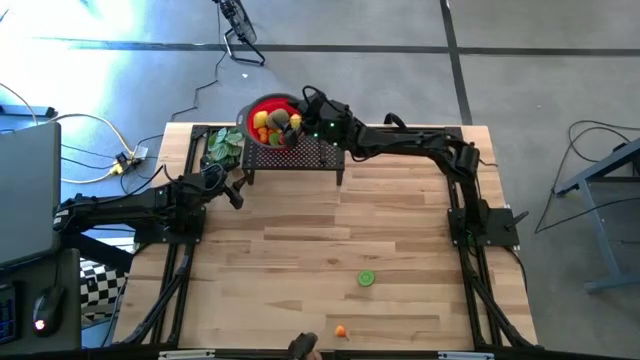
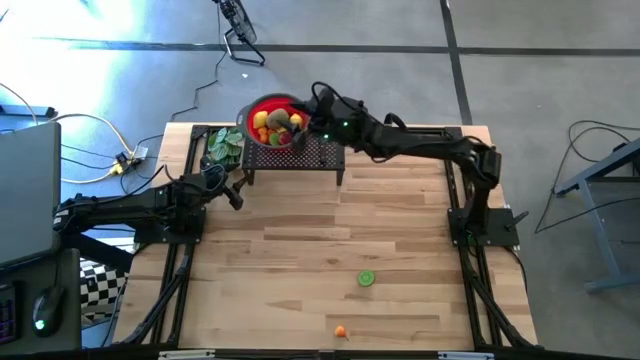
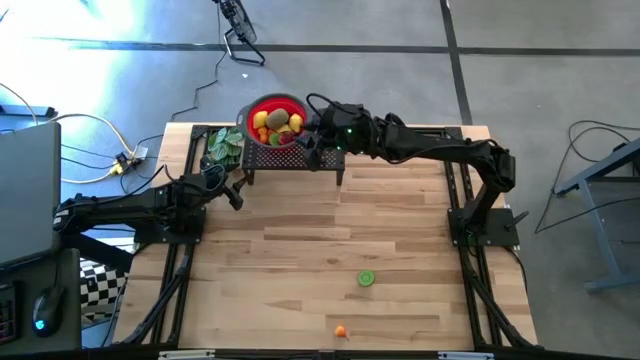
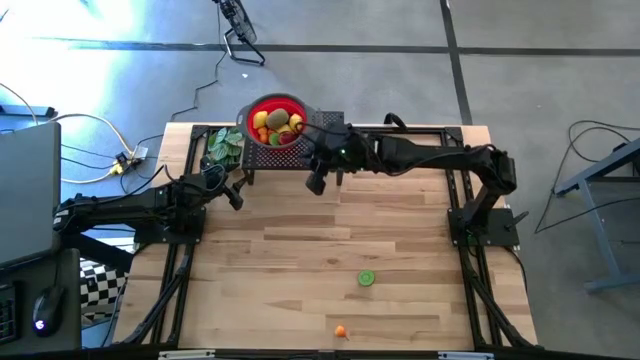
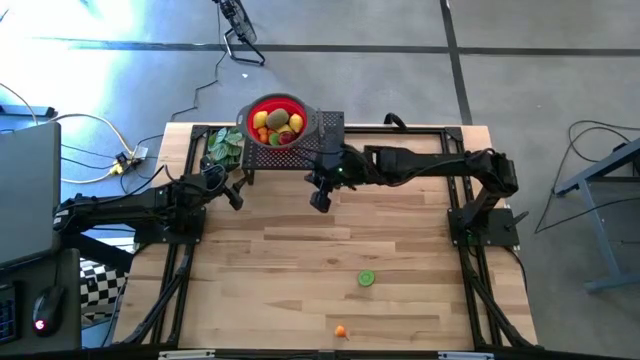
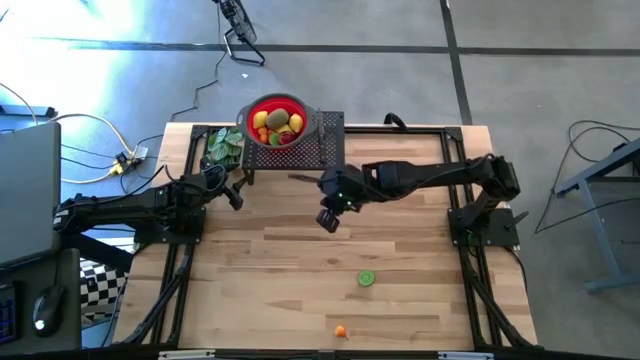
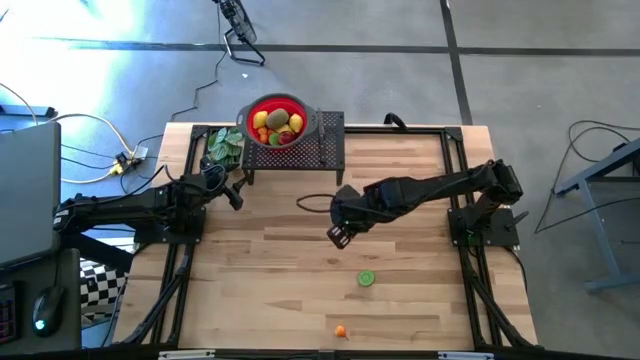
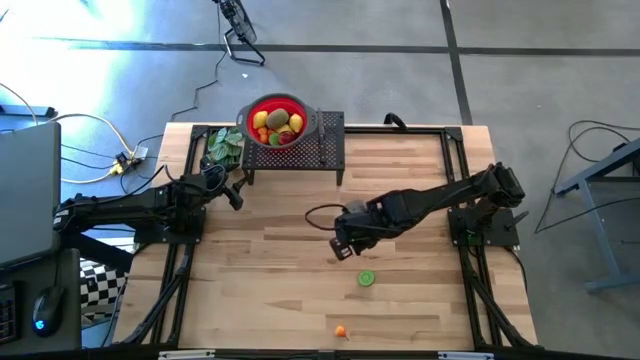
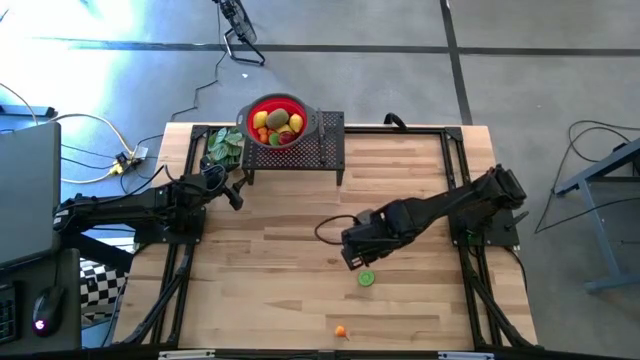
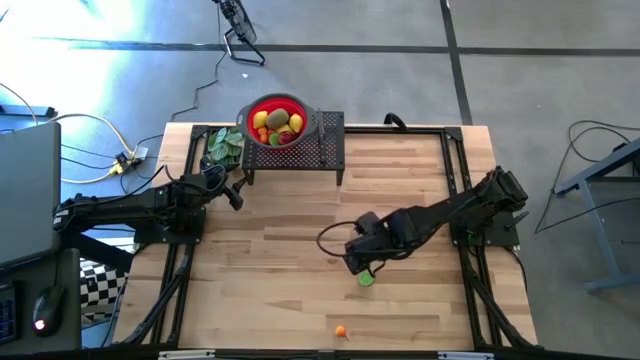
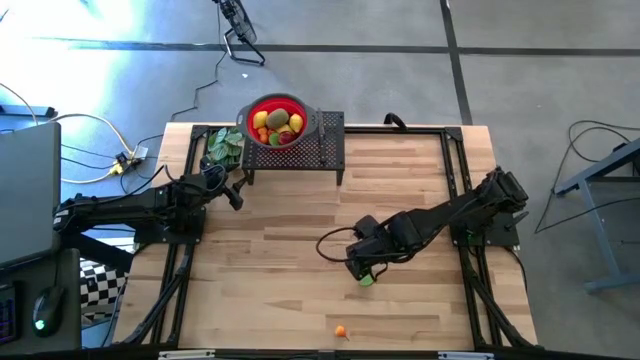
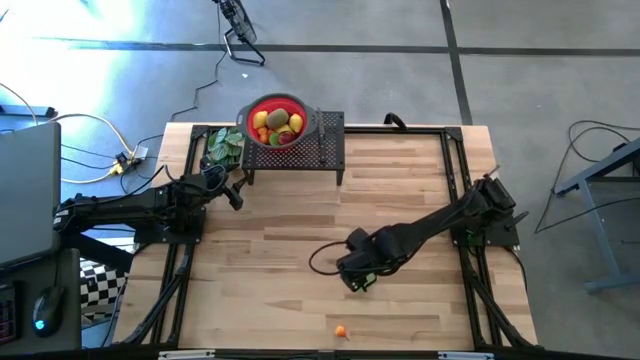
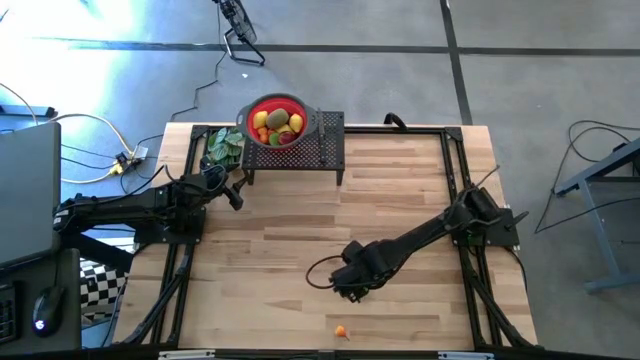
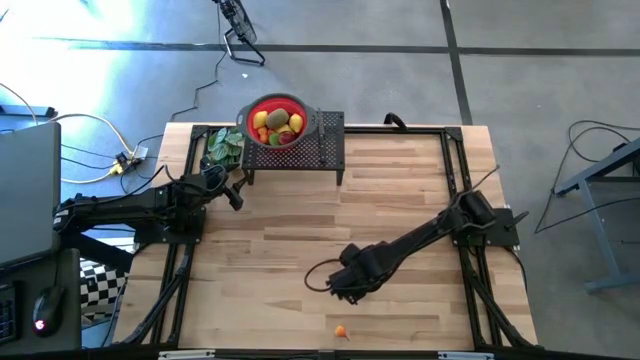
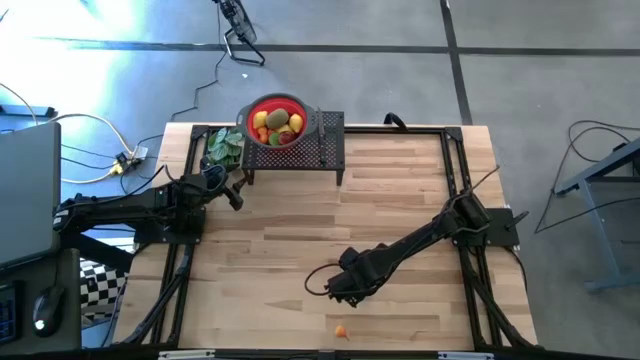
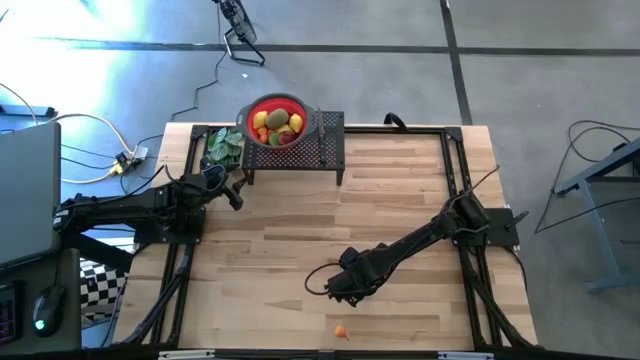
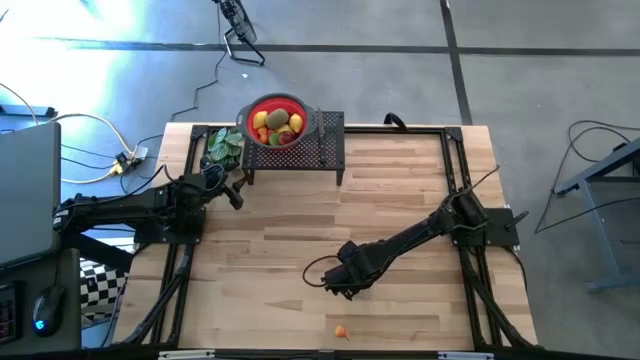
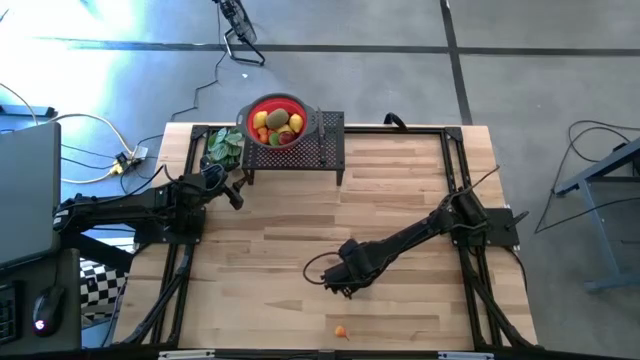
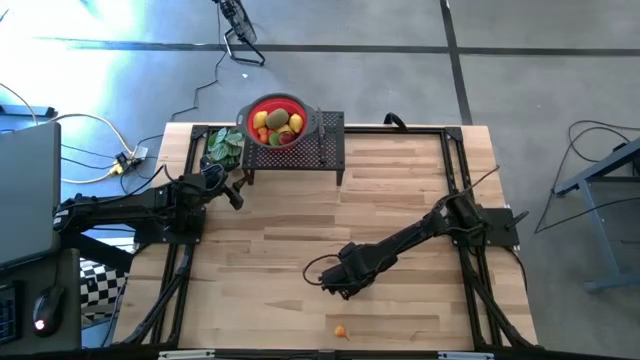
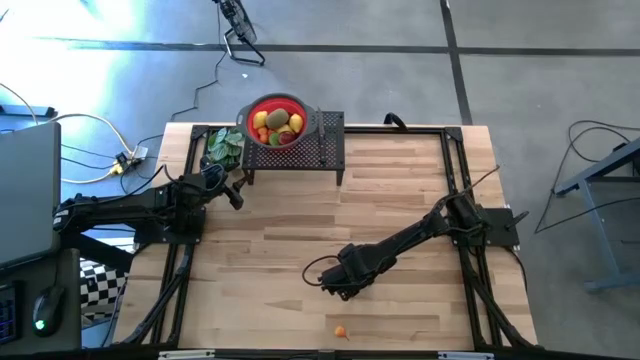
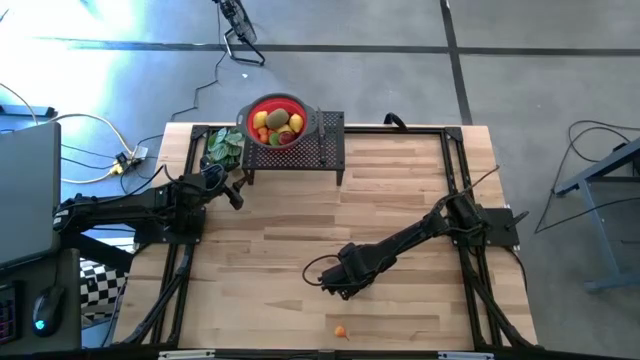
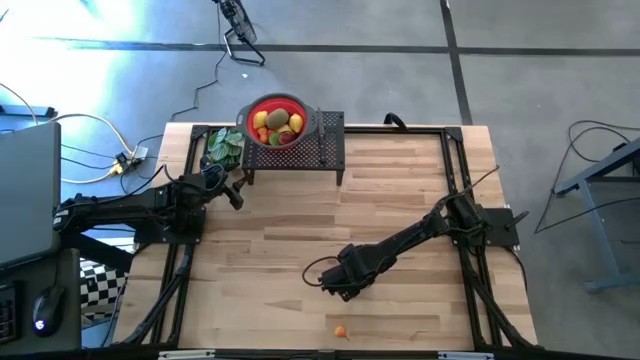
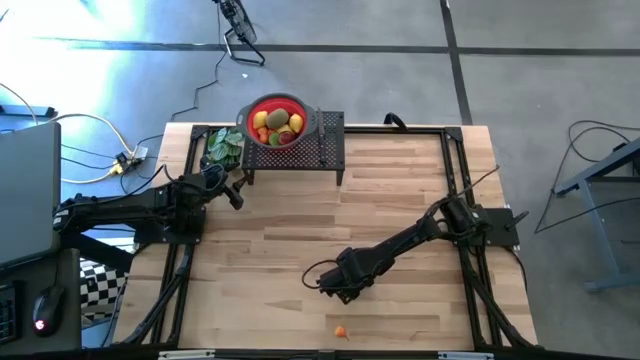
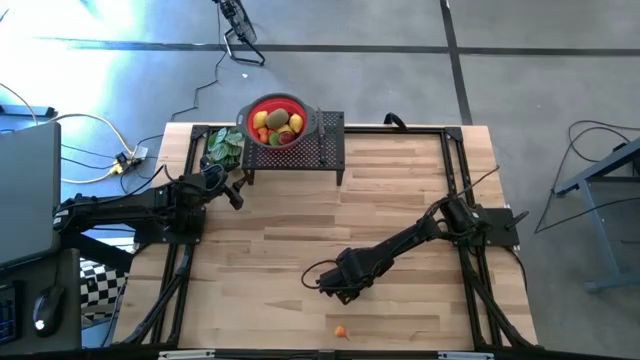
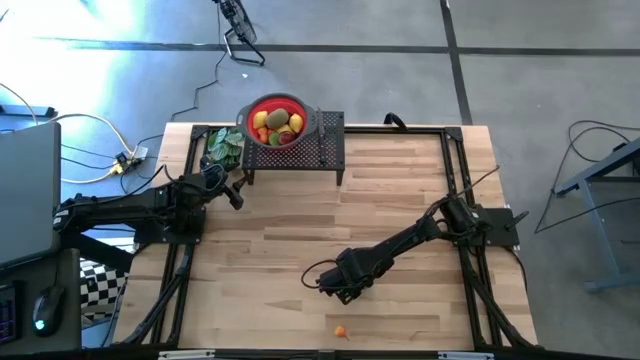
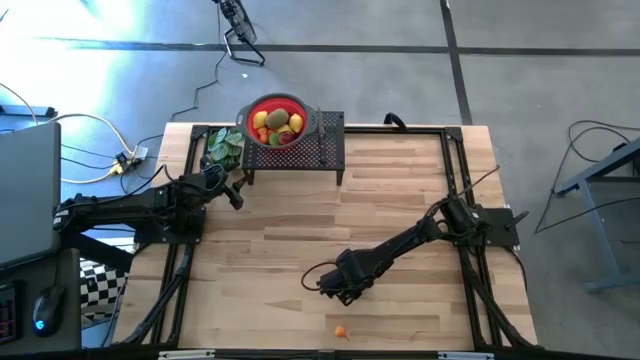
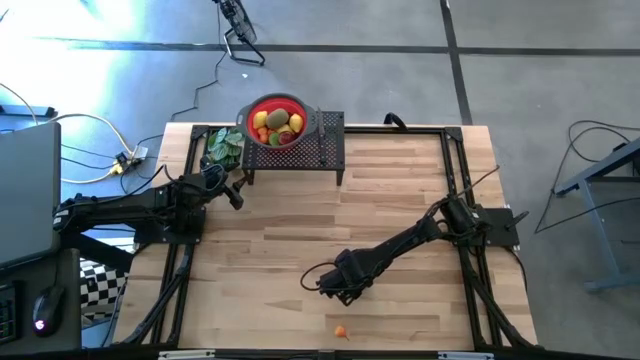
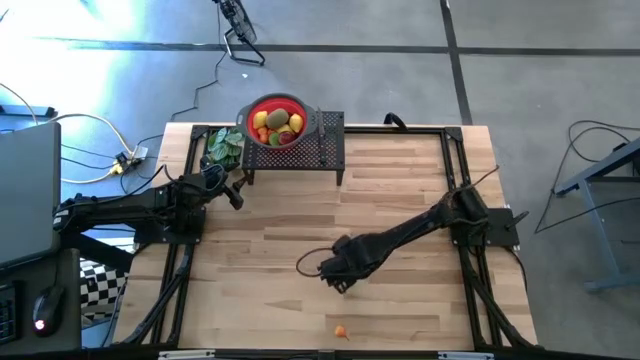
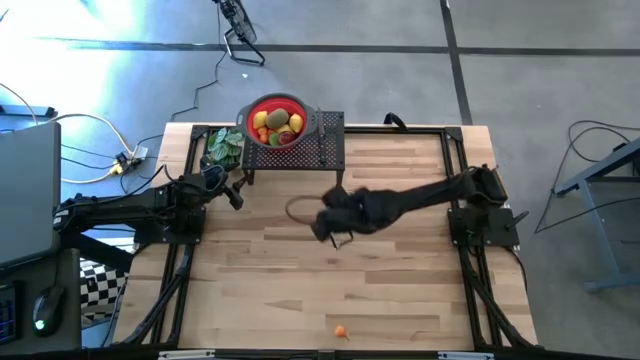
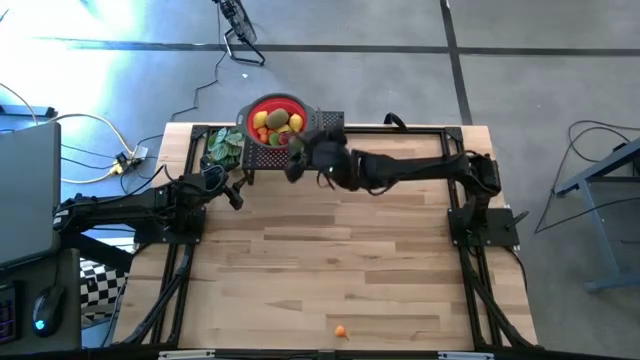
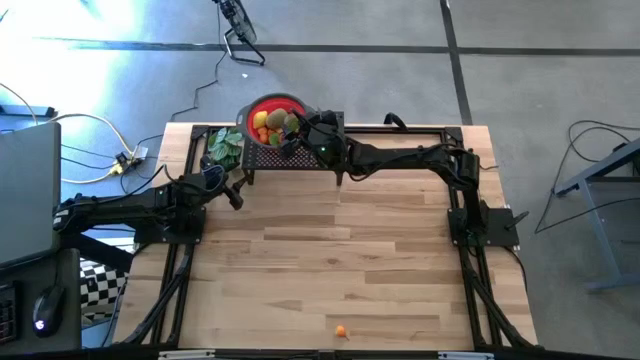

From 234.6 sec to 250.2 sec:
Task: Pick & Place Fruit
Put the brown sliced kiwi into the red strainer bowl on the shelf

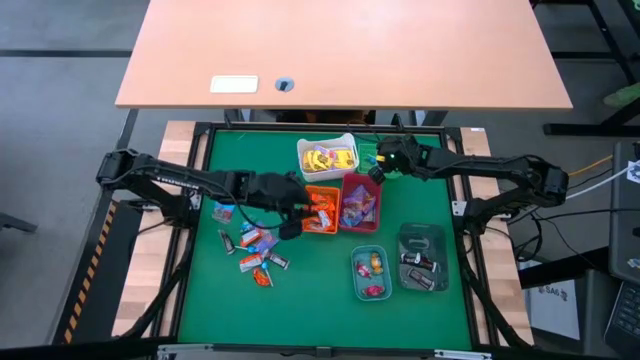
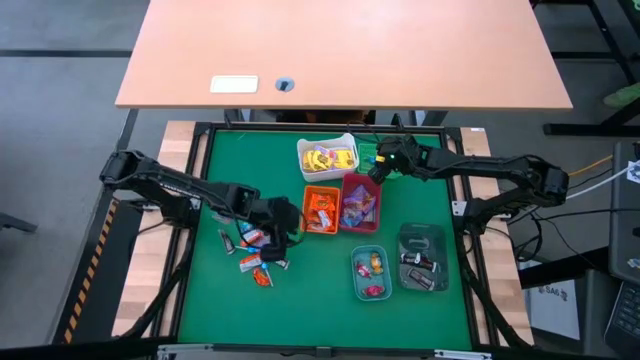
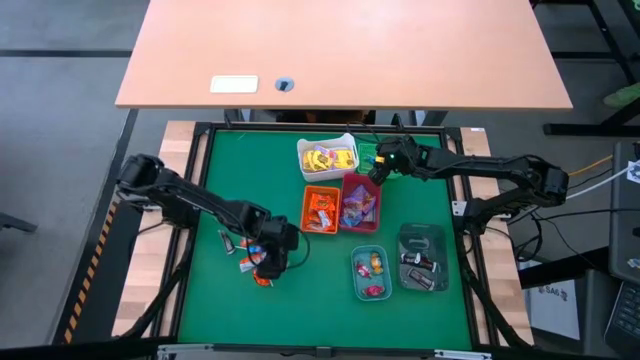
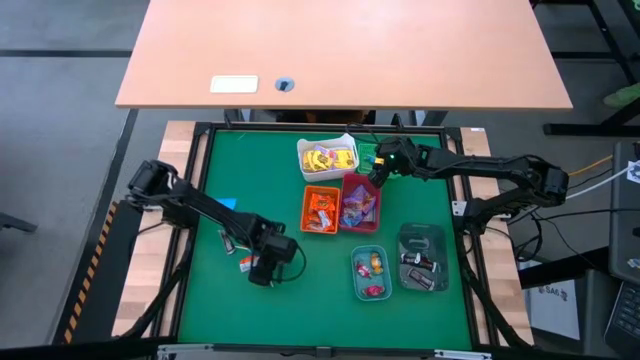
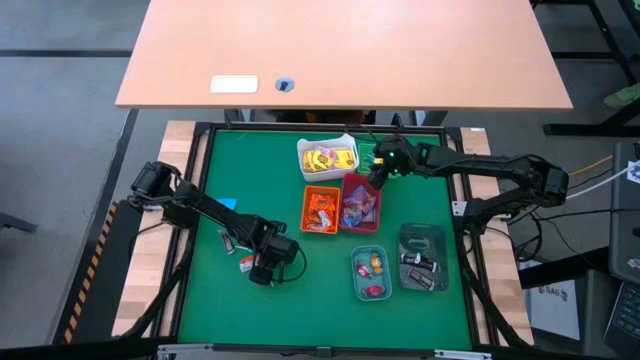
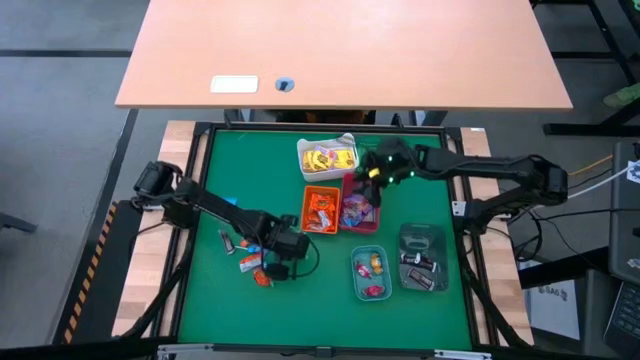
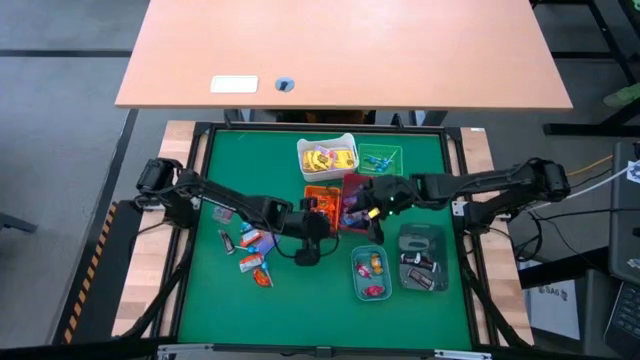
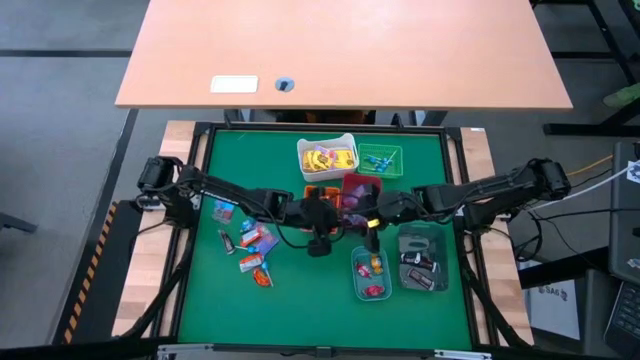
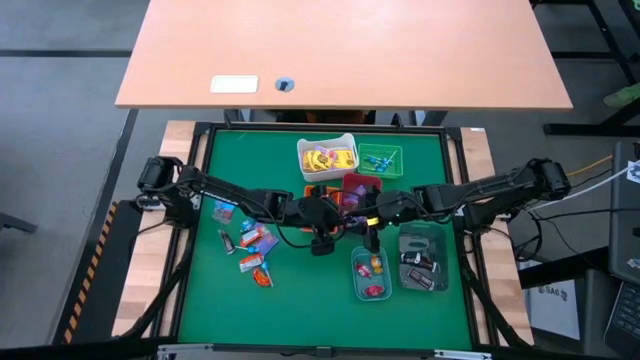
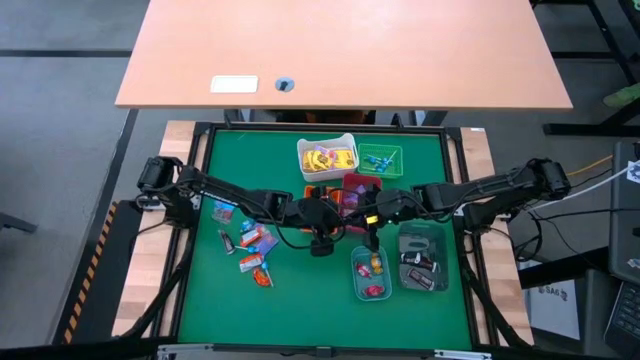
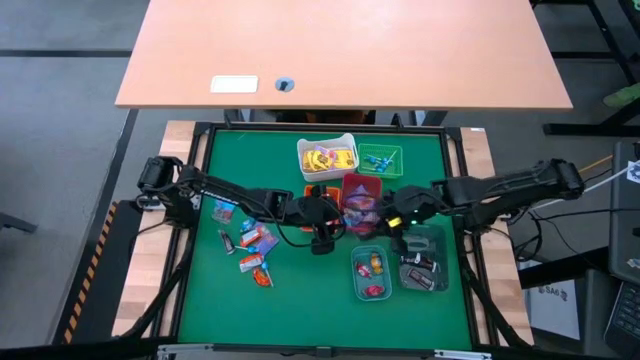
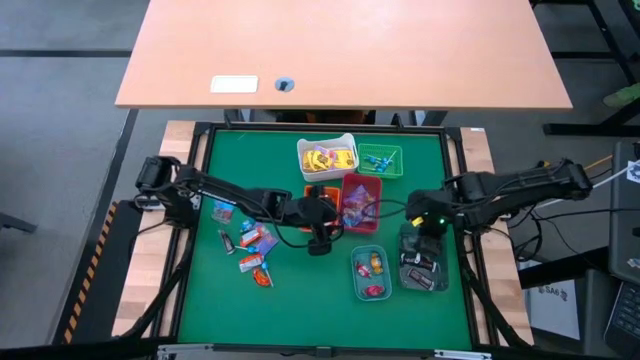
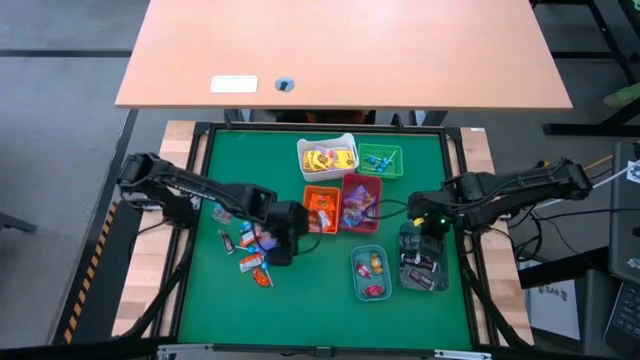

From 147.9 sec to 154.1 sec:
Task: Sort candy
Put the brown chocolate into the gray bin
